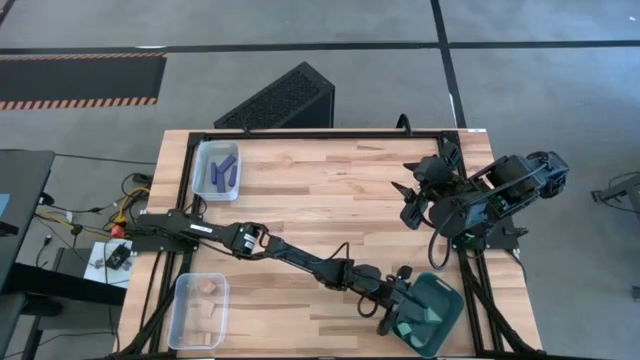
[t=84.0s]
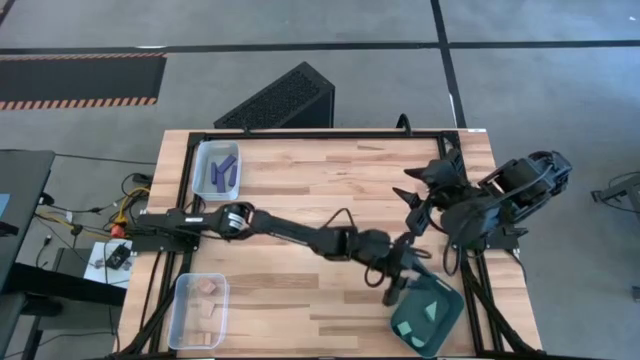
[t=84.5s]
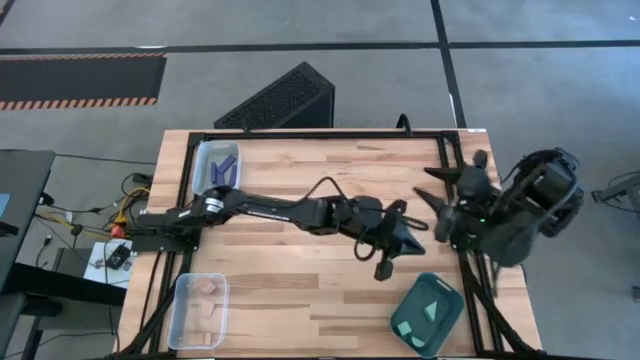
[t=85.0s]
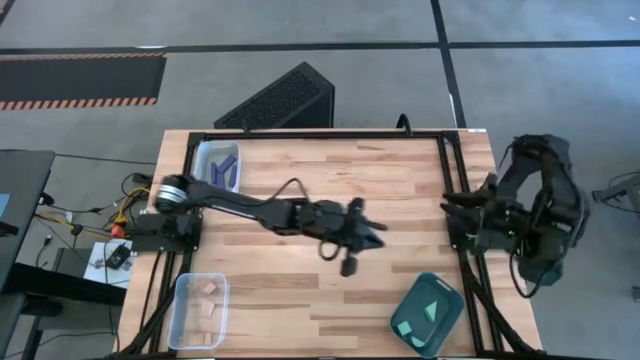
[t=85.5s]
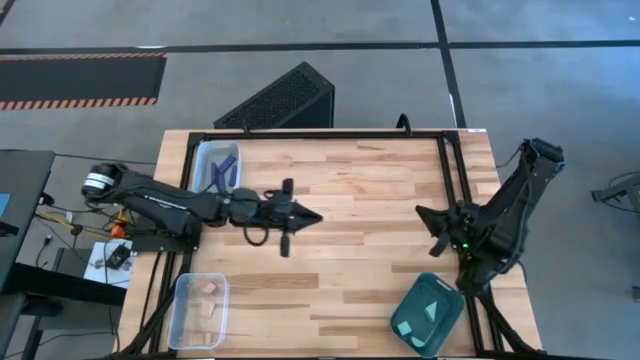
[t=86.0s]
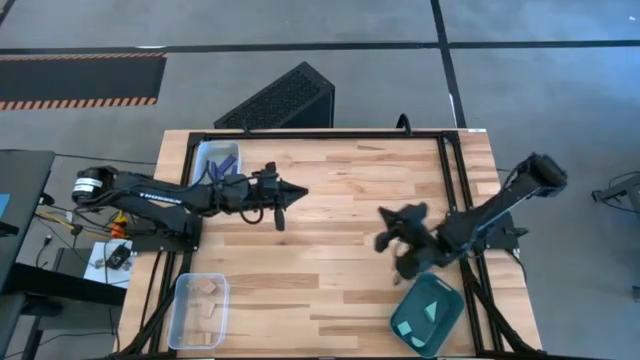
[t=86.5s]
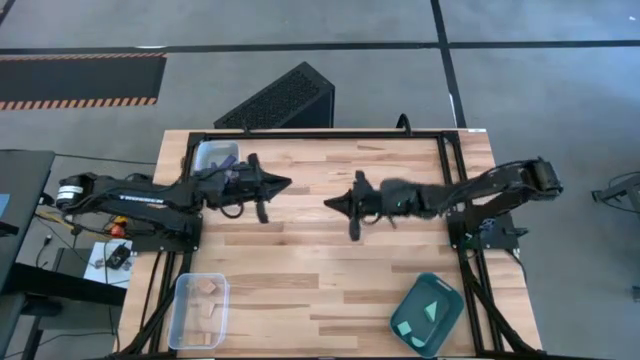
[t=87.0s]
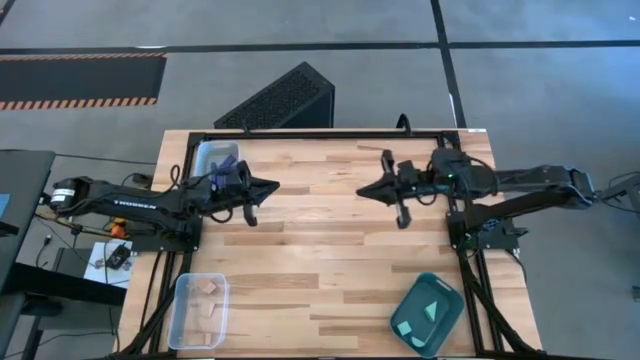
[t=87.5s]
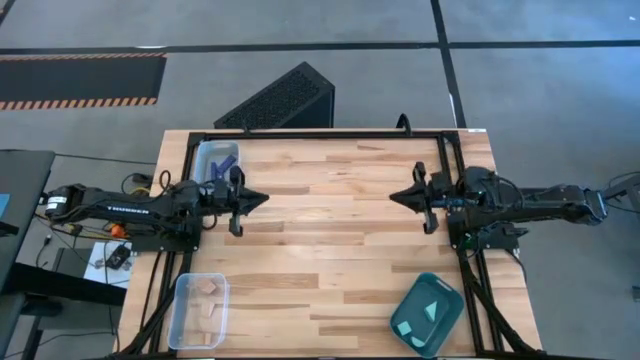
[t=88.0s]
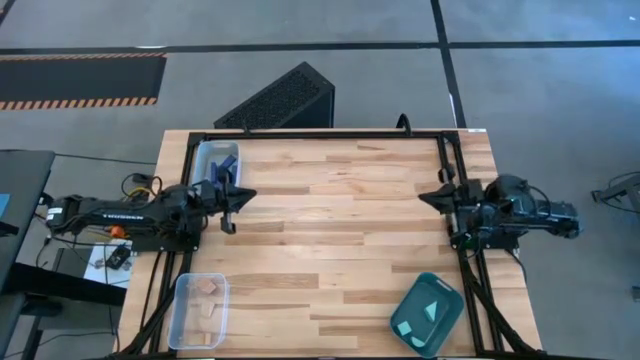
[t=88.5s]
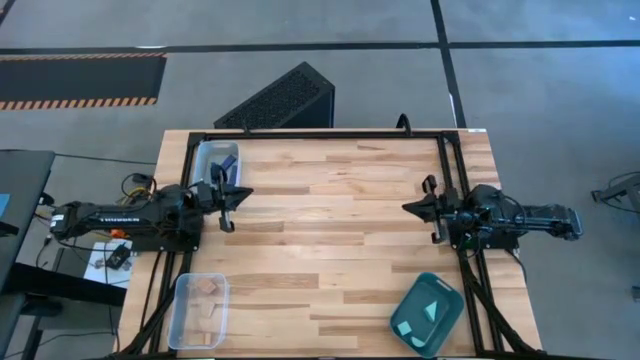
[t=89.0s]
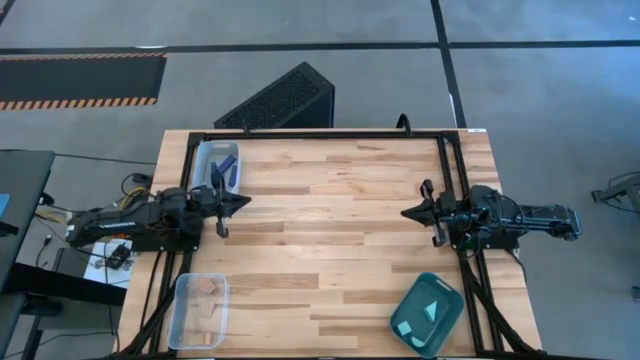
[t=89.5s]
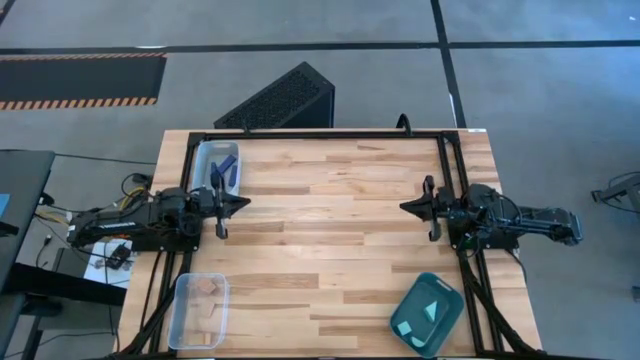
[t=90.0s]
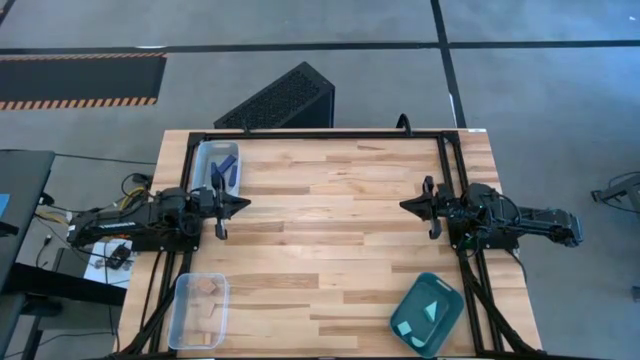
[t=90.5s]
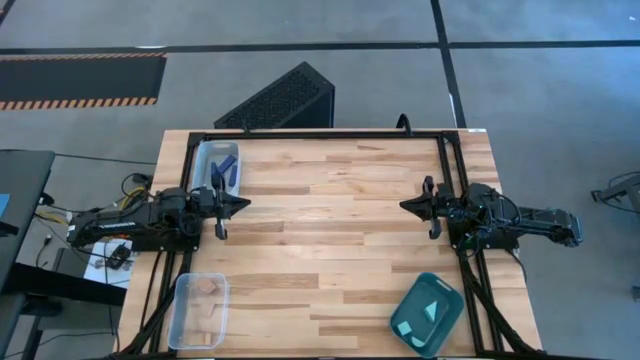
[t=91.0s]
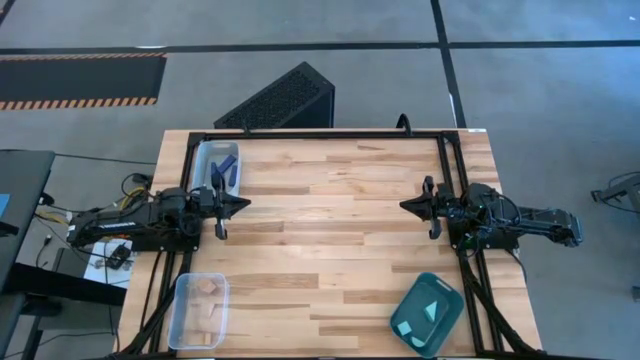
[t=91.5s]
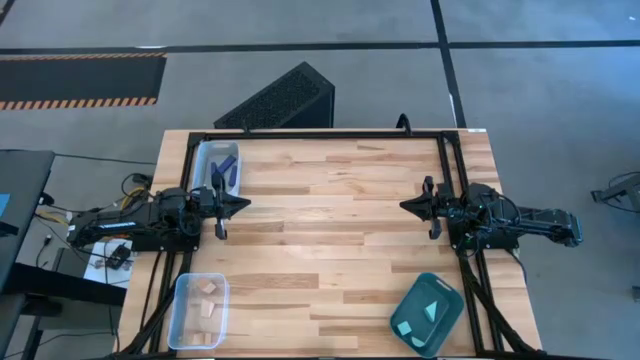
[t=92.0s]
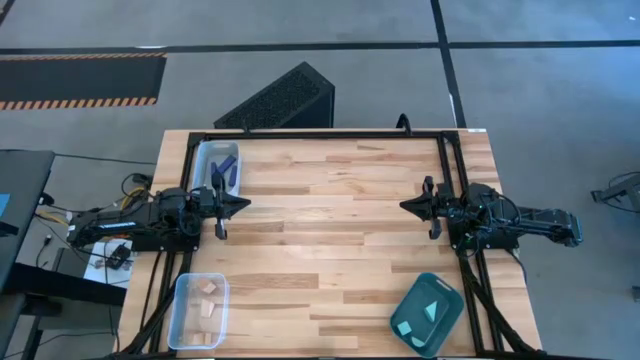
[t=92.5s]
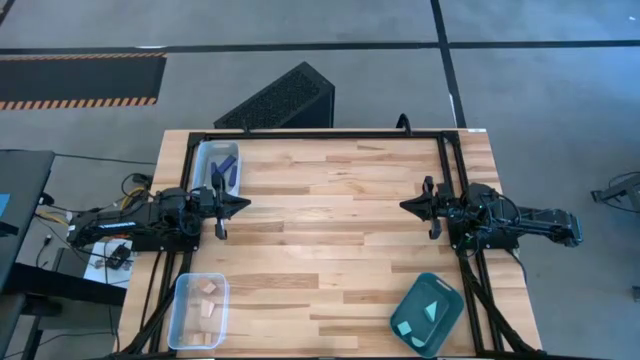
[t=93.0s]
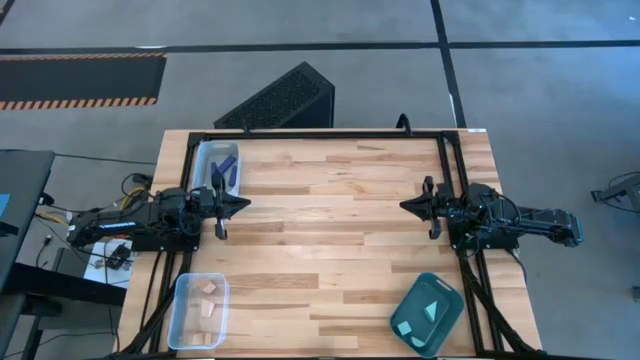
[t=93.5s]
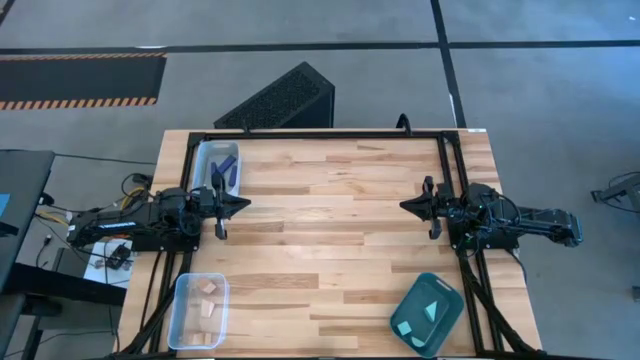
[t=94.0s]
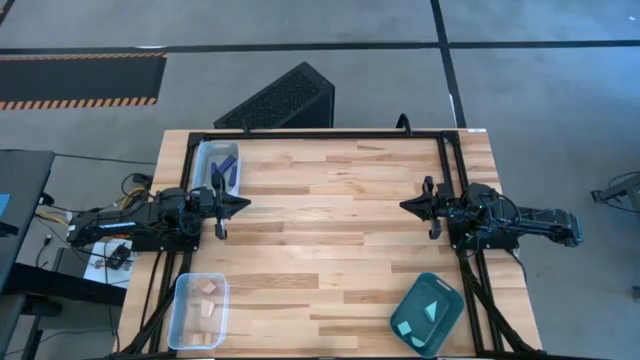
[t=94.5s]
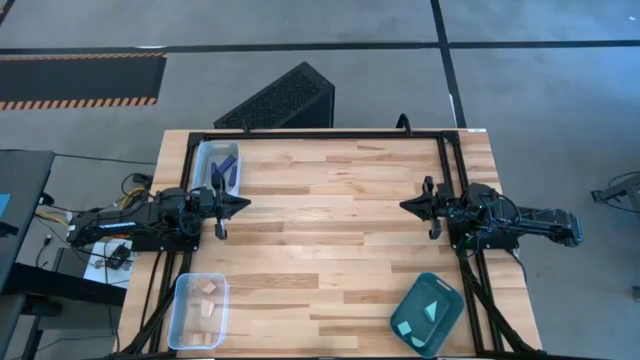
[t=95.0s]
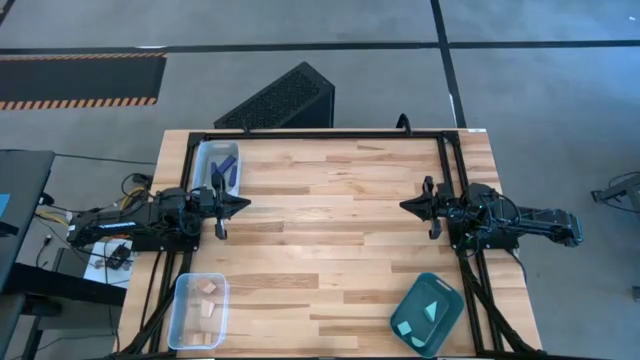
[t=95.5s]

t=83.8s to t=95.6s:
Task: Sort & place blocks by color
Return to Home Position

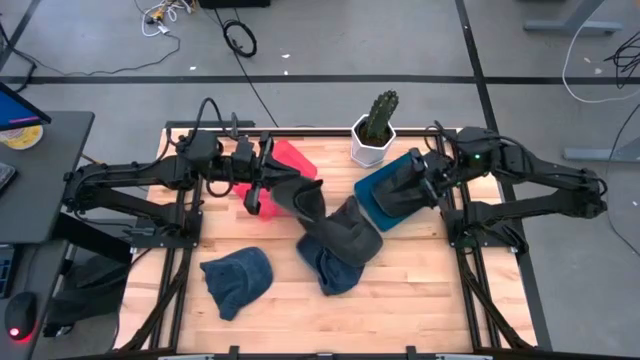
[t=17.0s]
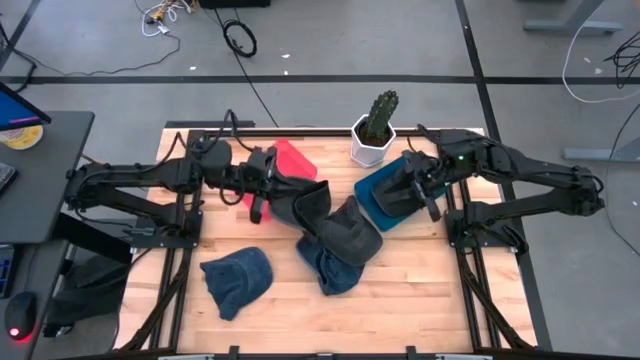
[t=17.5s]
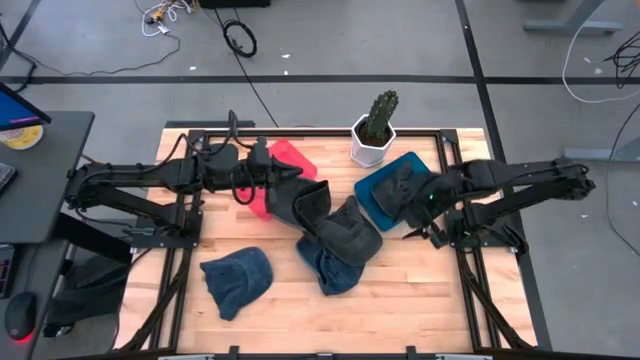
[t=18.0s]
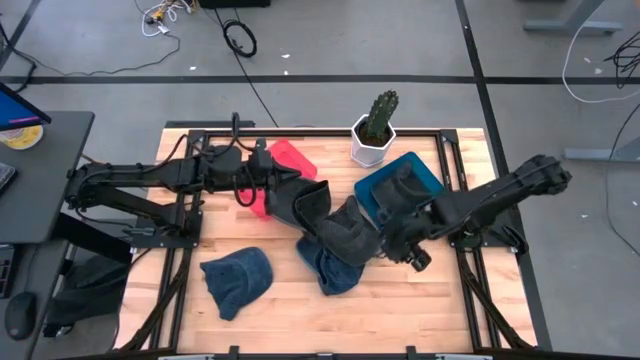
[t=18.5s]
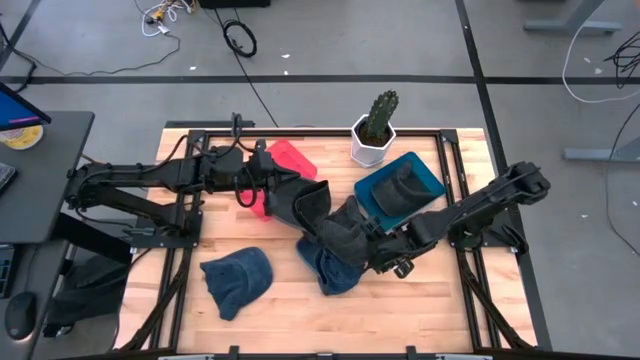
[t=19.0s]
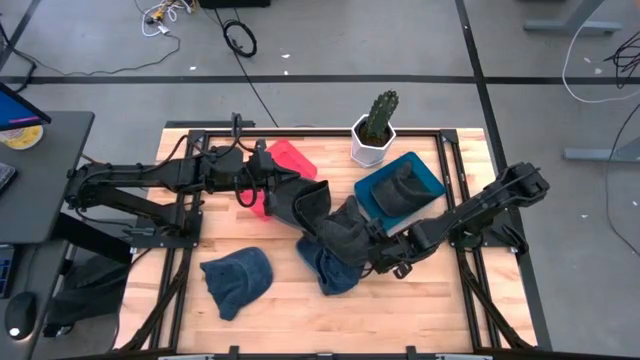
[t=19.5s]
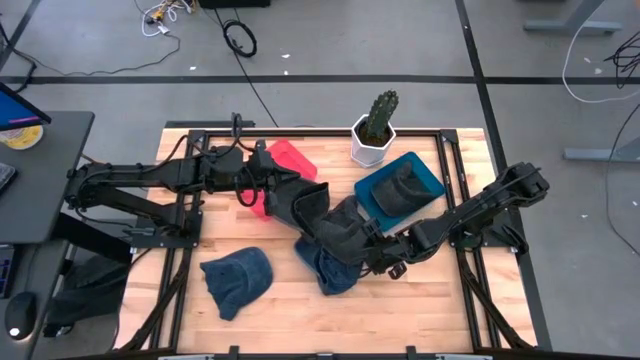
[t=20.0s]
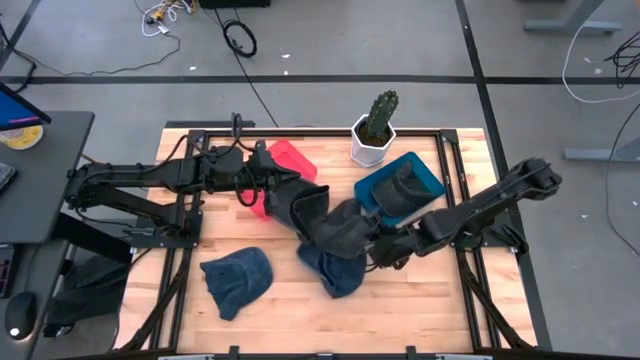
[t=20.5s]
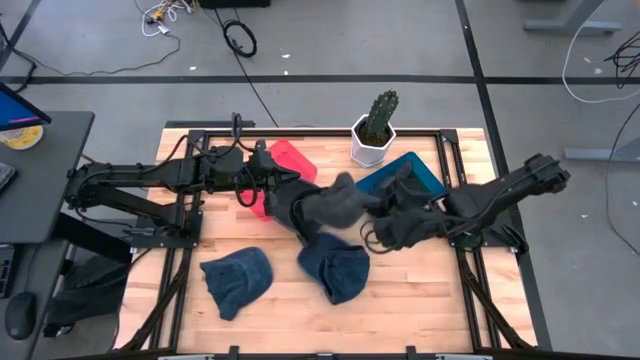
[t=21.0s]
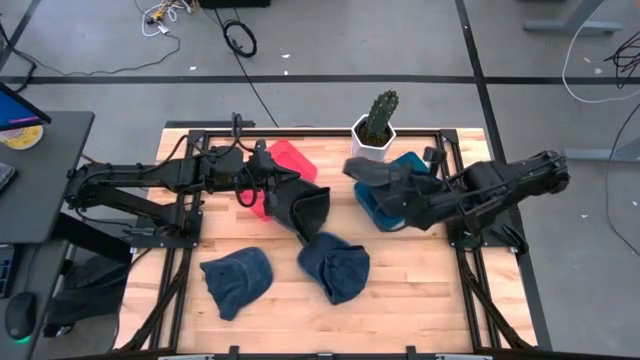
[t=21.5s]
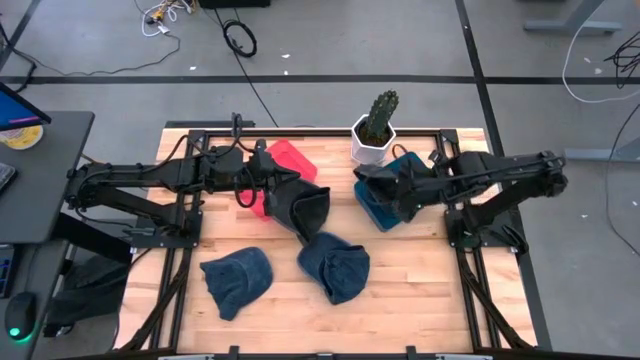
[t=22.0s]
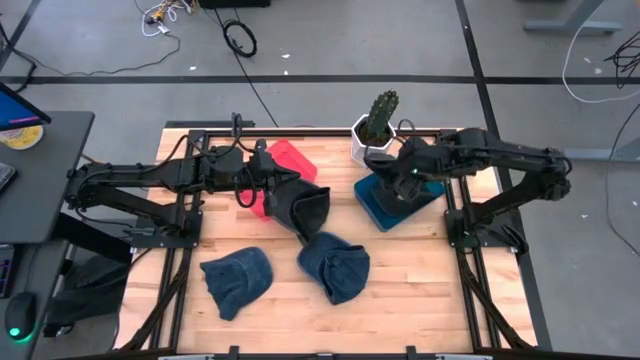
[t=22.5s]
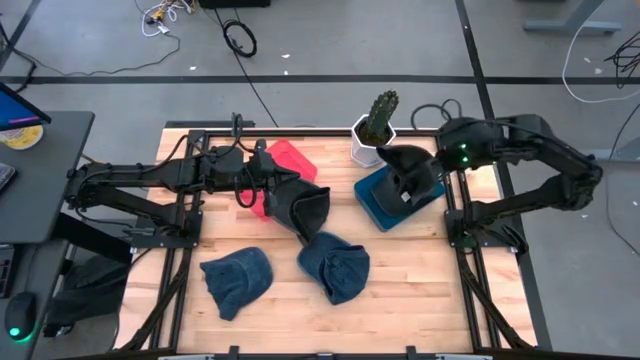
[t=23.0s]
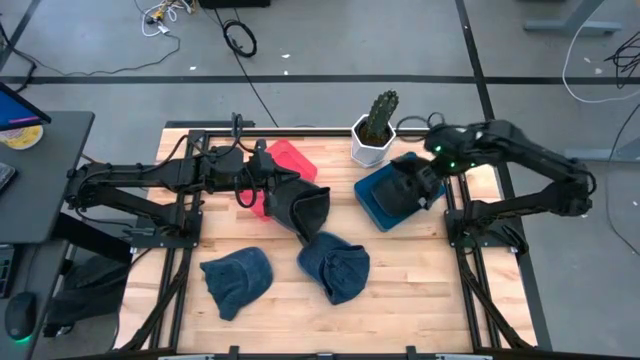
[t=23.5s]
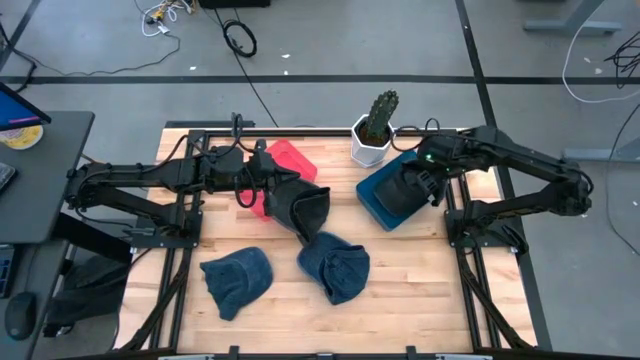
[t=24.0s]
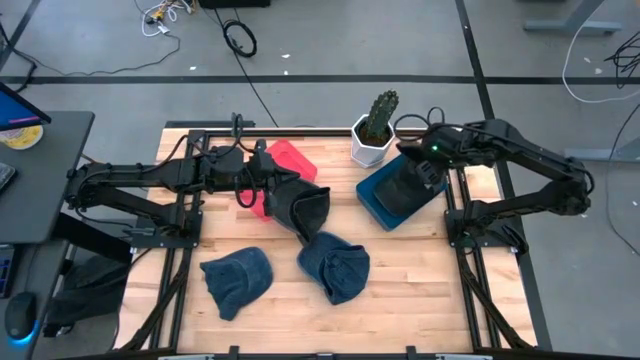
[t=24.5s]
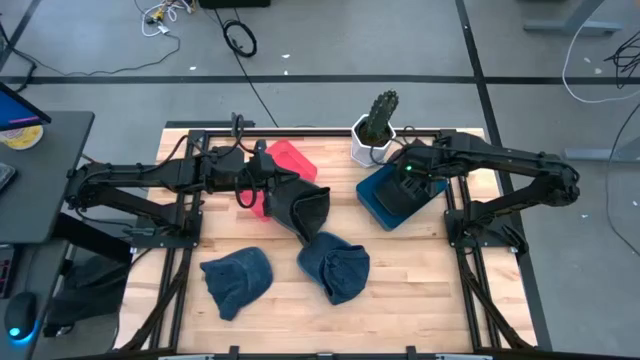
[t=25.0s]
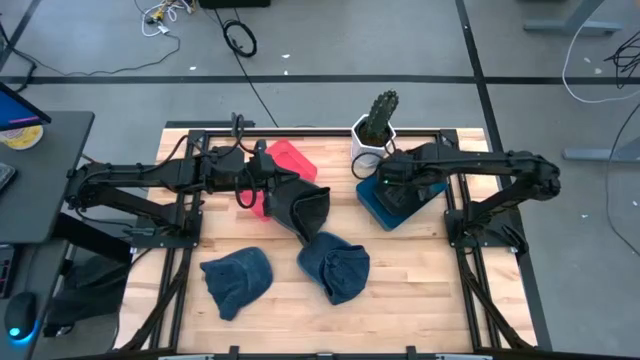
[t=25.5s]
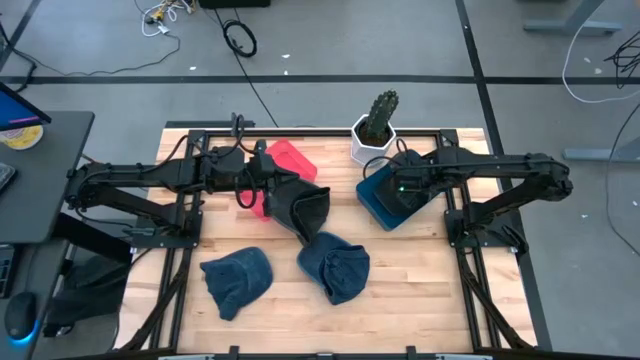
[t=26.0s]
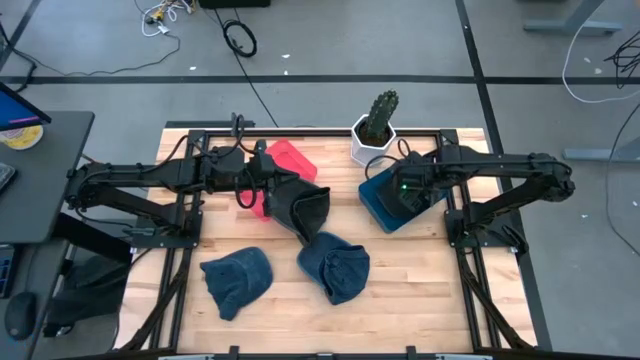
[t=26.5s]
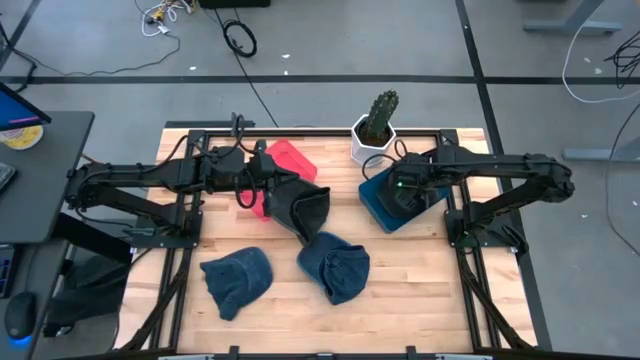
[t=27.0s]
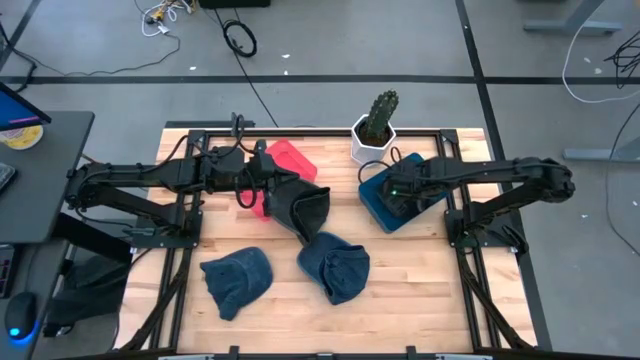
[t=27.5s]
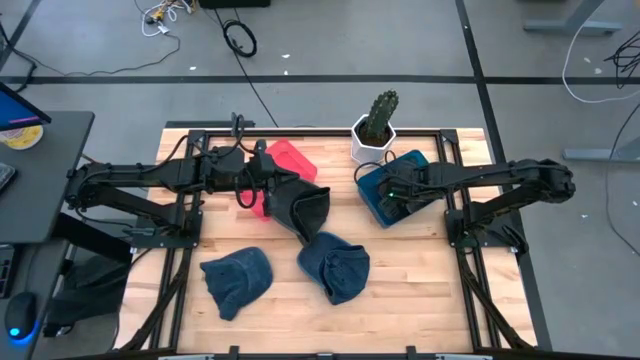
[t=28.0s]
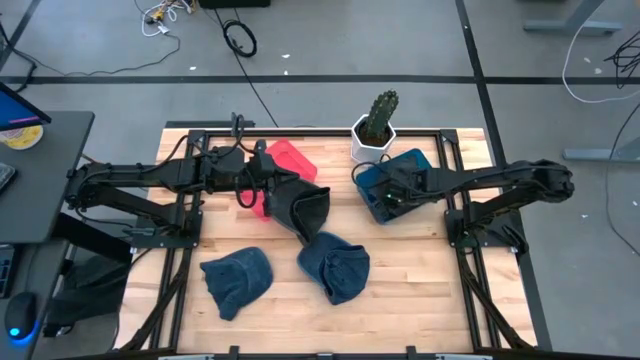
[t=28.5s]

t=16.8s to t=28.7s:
Task: Pick & Place hat
Put the left black cap into the blue bin
